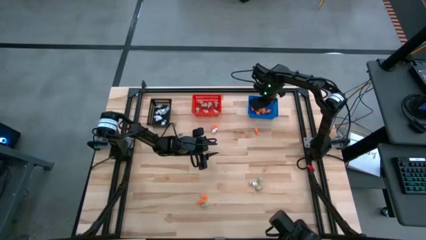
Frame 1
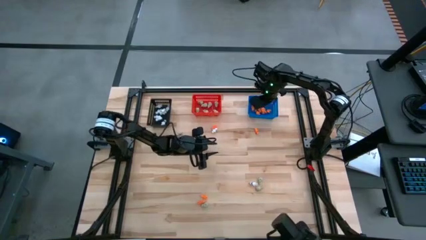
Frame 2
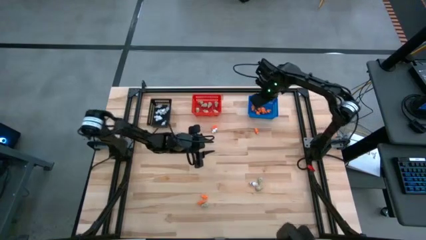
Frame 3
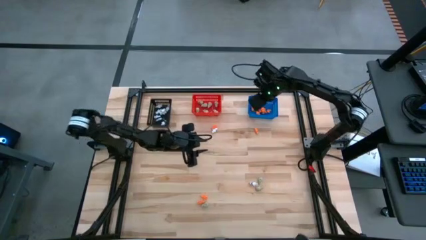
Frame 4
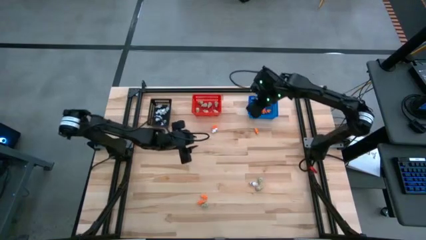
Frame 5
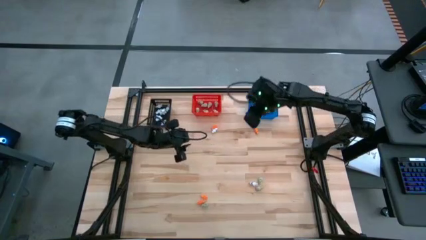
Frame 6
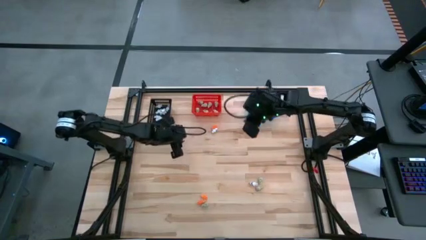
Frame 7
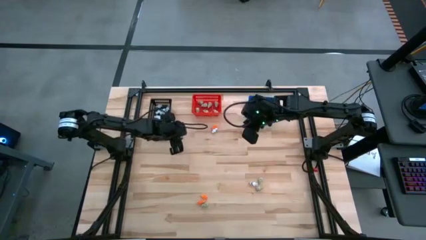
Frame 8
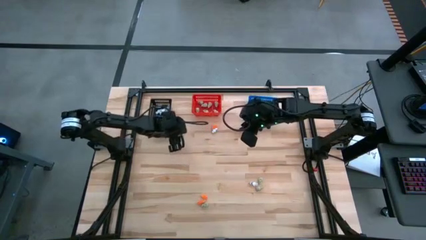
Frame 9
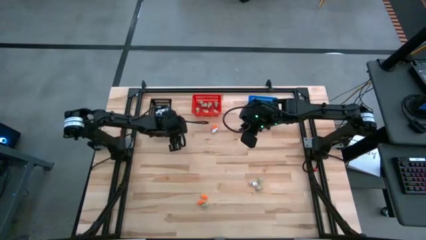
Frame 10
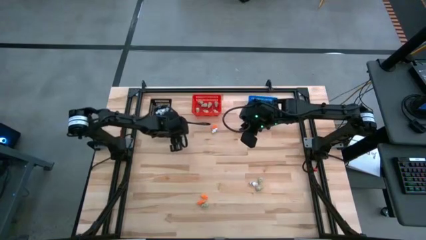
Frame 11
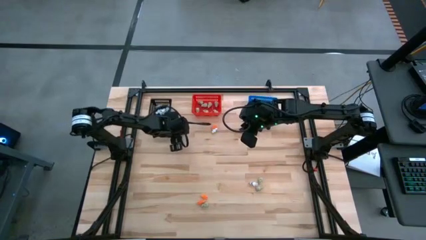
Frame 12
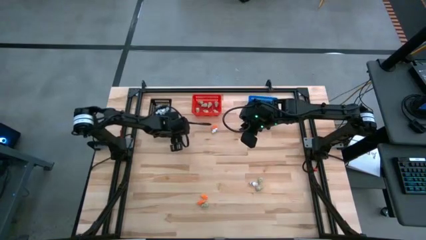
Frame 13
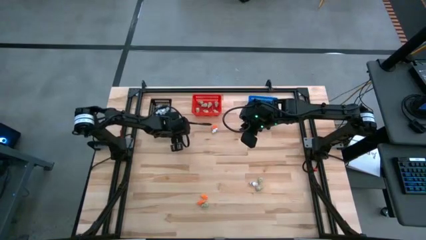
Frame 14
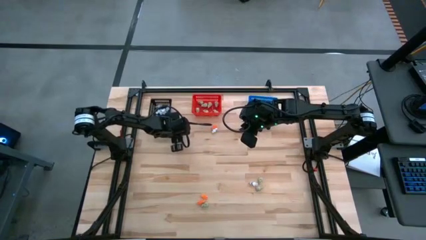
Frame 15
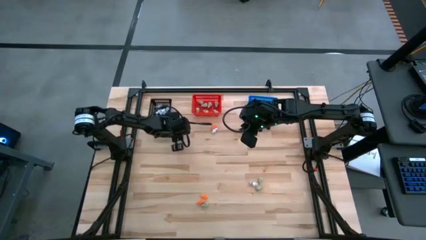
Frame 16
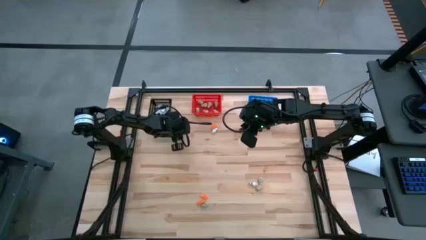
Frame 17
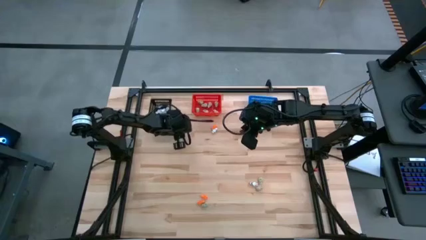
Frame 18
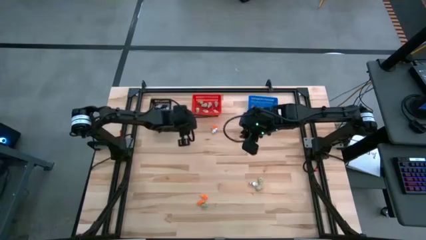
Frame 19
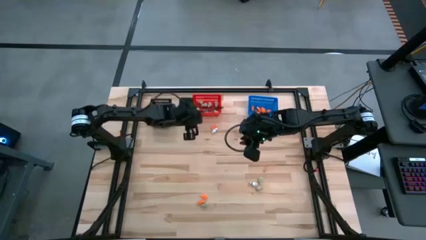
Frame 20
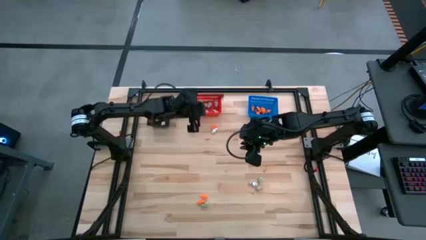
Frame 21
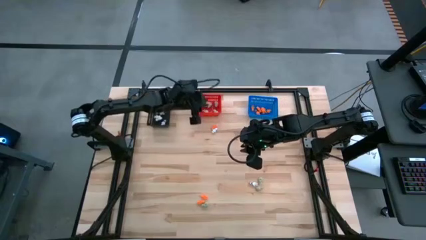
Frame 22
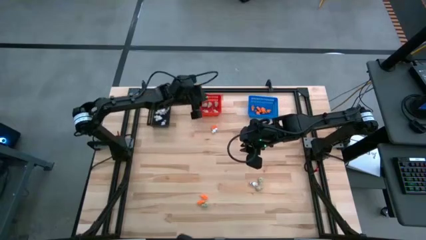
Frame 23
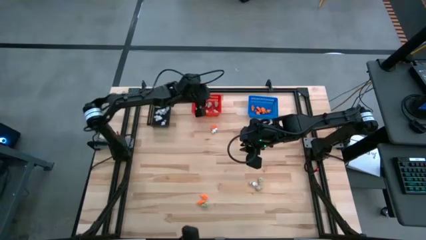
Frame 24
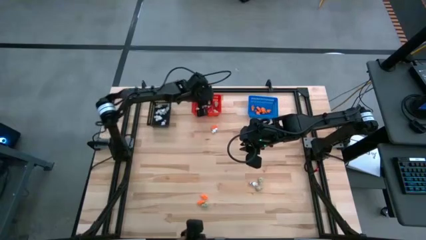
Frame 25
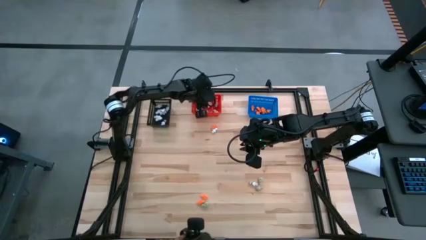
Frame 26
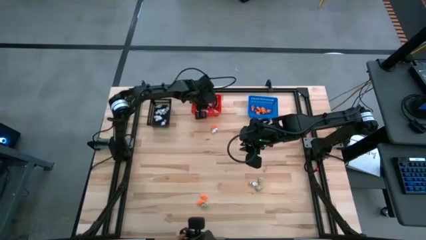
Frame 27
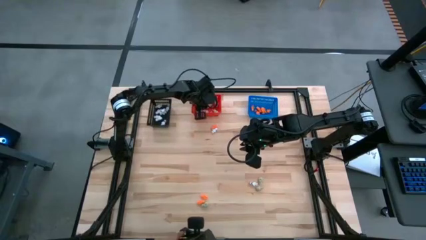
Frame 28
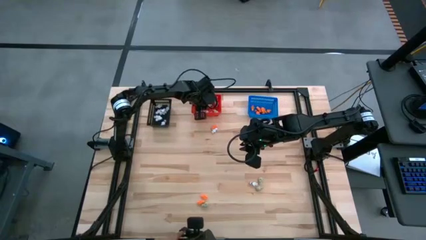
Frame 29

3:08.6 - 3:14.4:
Task: Sort Halloween decoration
Put the white skull toy into the red bin

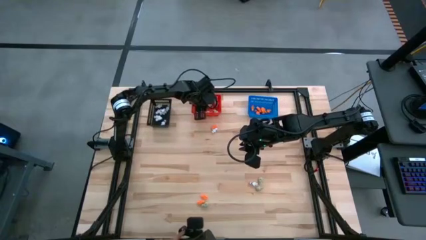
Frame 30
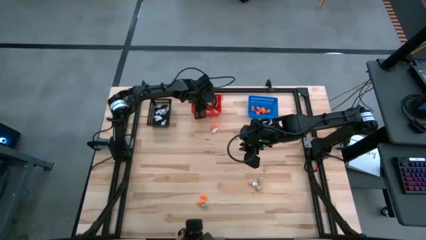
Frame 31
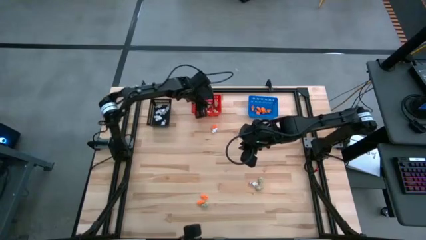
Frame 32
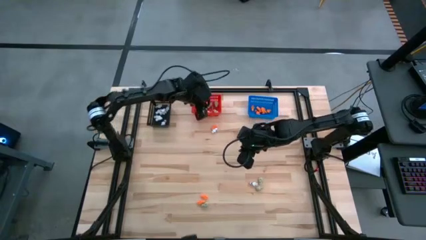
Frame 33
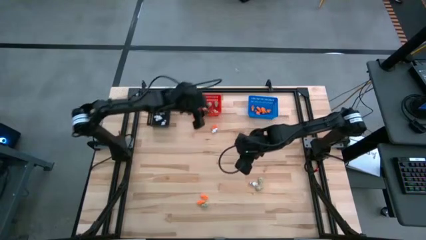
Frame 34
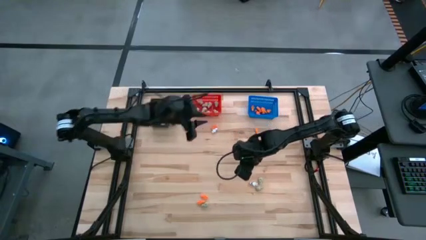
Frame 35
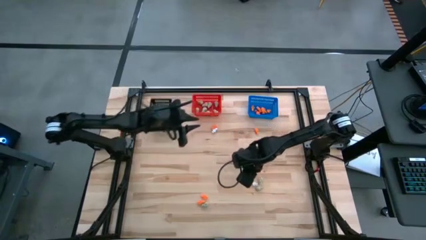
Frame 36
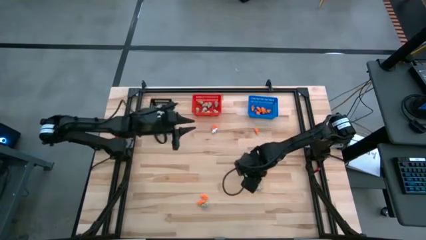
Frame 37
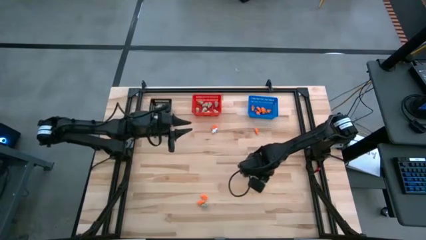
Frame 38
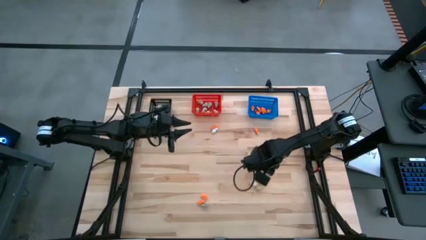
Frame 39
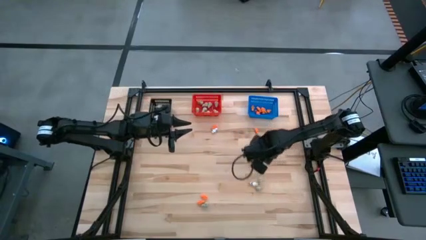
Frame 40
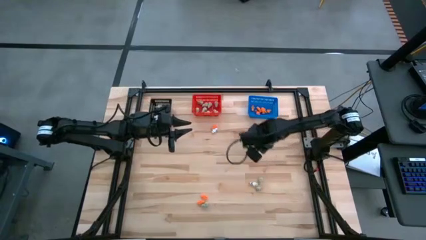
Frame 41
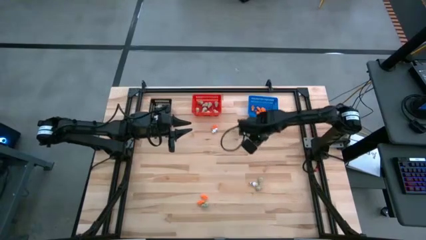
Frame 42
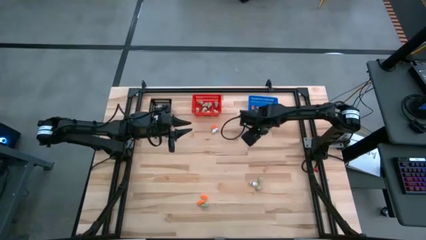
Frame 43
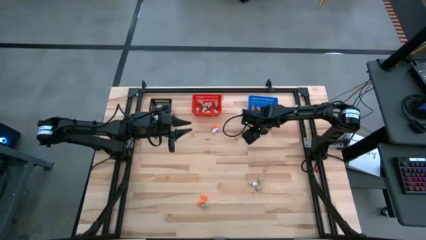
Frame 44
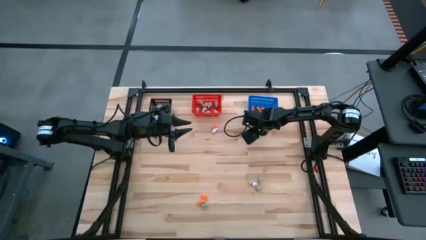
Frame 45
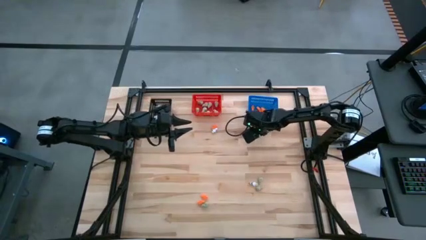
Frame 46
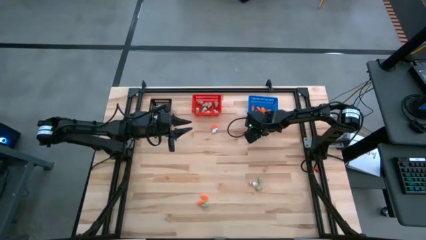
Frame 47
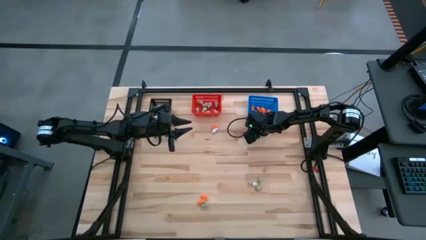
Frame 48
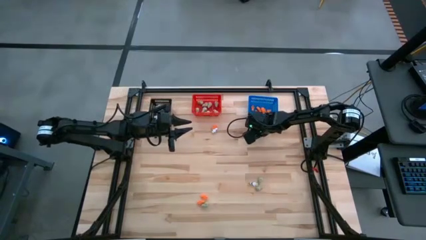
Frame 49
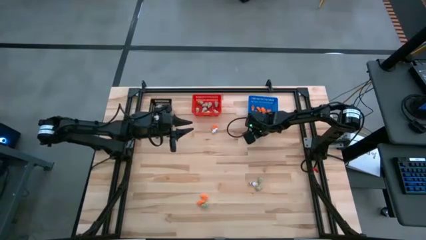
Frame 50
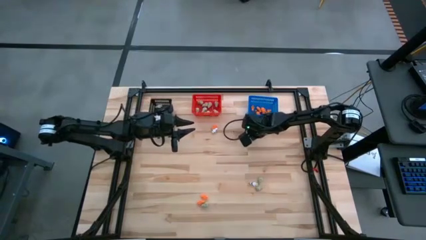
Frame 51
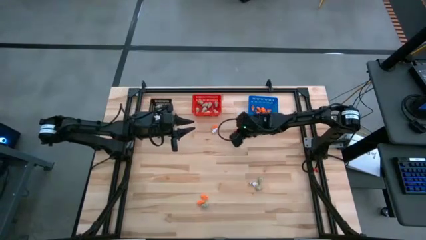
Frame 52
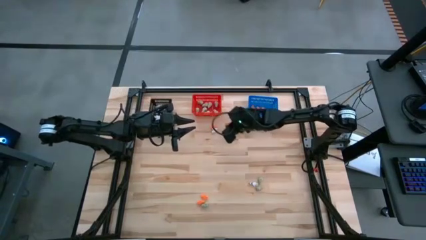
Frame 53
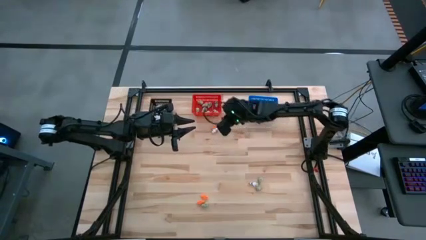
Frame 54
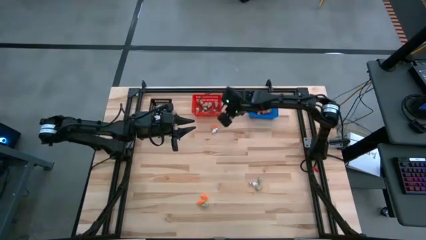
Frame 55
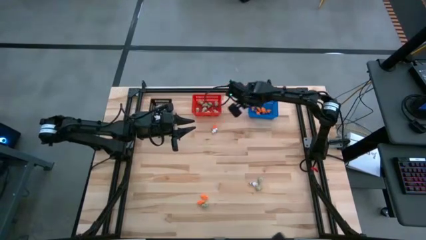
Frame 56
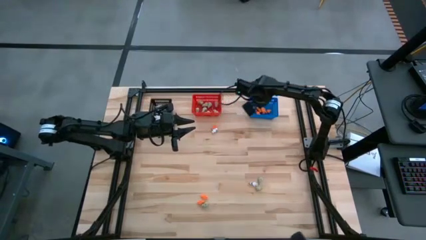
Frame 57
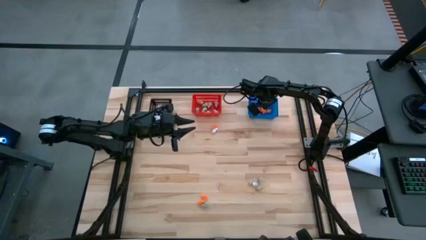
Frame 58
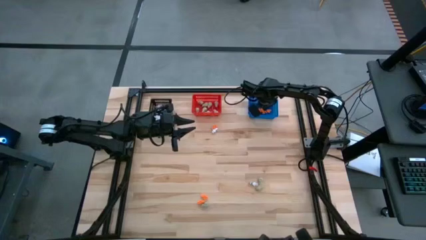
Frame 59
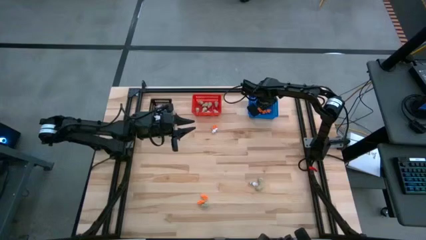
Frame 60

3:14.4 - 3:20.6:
Put the orange skeleton toy into the blue bin

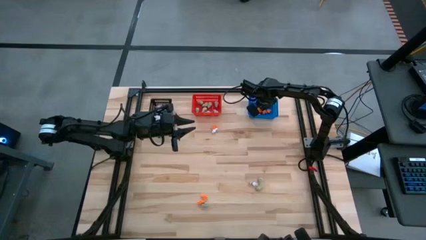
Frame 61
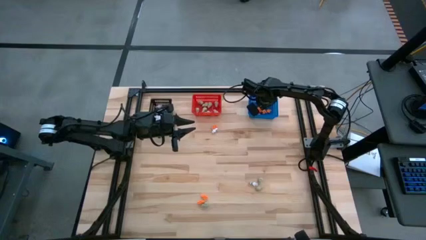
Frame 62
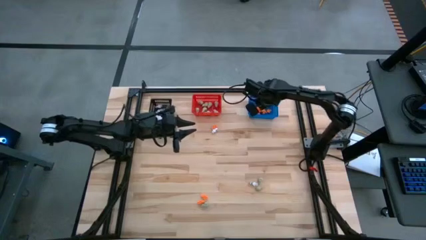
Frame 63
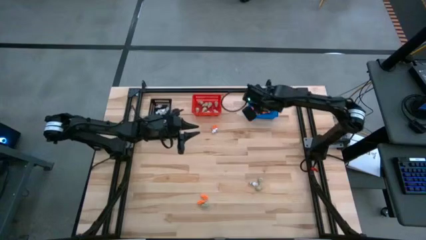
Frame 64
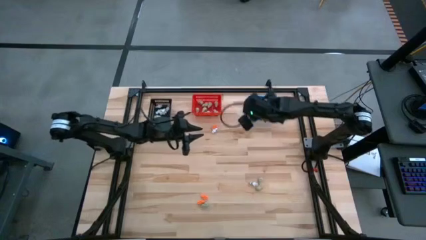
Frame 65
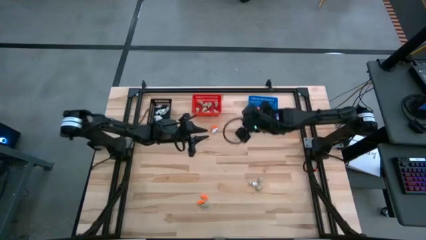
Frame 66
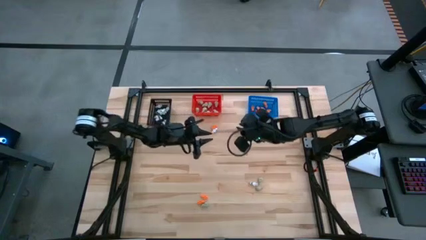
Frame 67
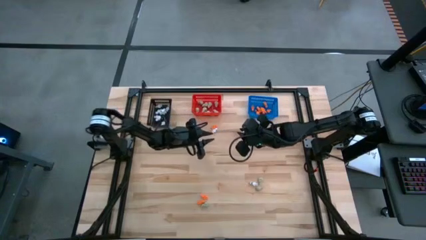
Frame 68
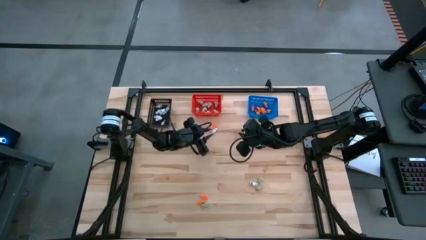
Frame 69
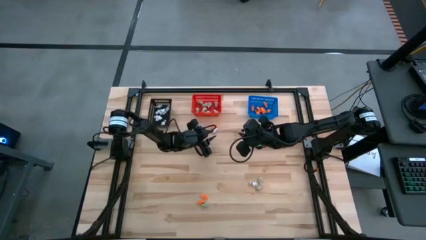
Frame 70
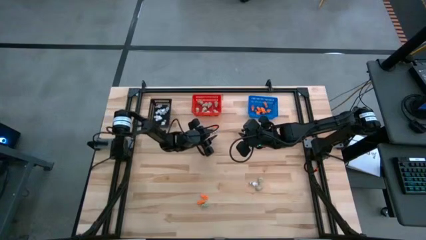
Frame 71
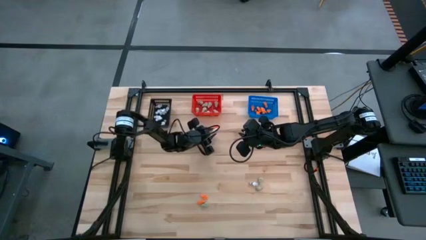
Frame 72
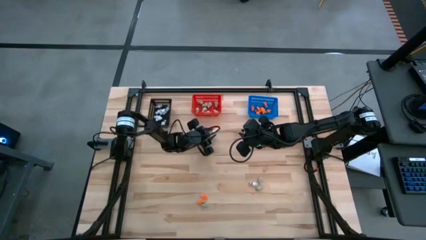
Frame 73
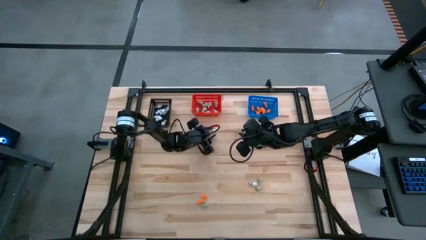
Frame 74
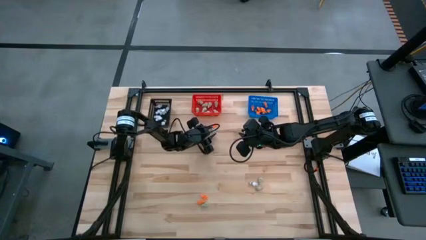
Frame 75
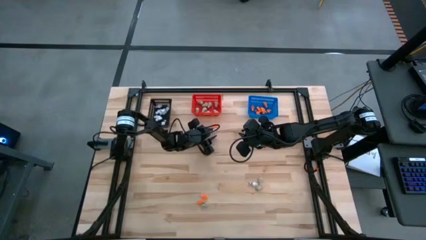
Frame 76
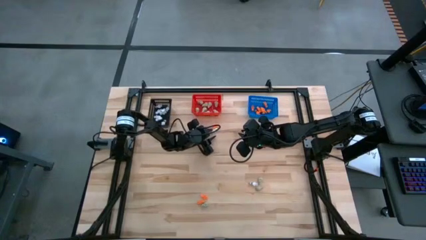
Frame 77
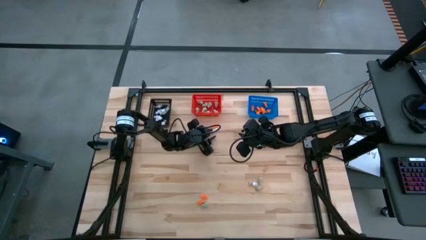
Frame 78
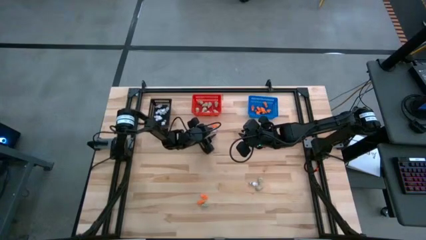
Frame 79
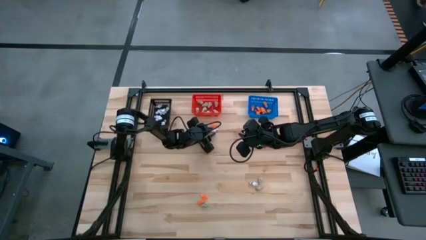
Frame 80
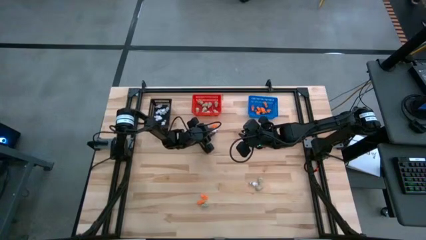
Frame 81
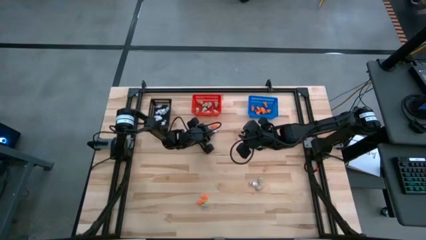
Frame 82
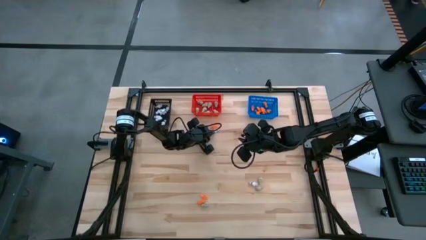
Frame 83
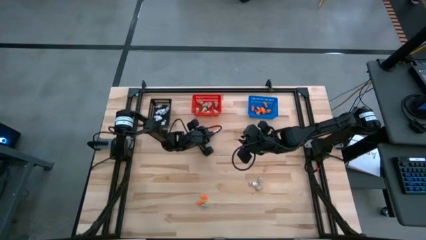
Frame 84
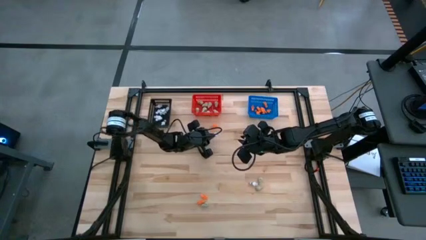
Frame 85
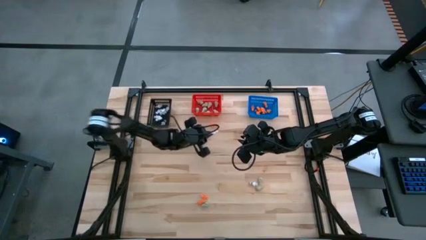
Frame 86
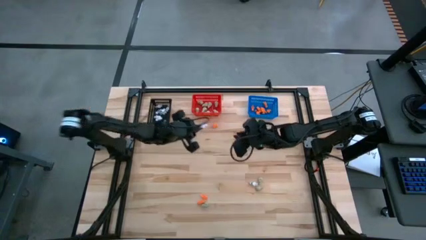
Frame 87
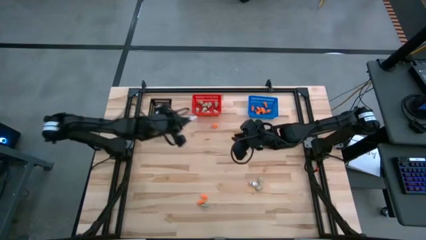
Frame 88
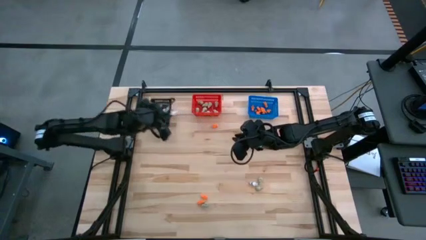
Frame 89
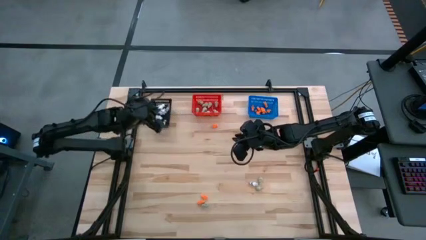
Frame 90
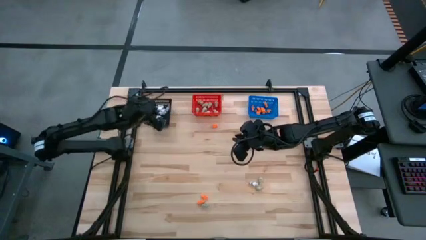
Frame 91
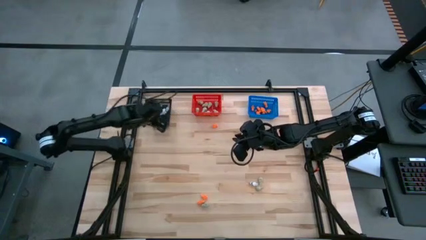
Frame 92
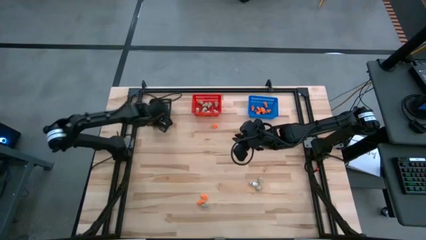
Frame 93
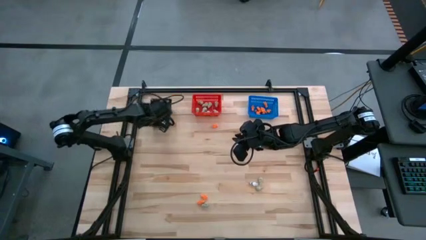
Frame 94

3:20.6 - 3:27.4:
Put the white skeleton toy into the black bin
